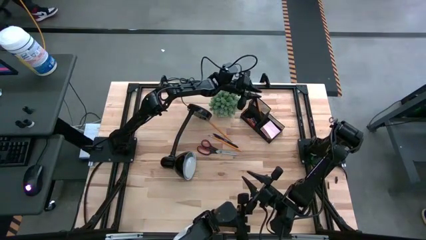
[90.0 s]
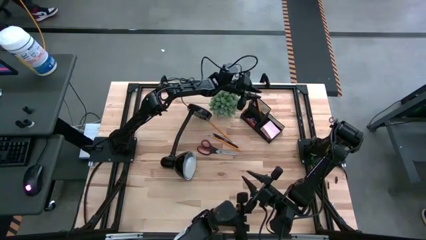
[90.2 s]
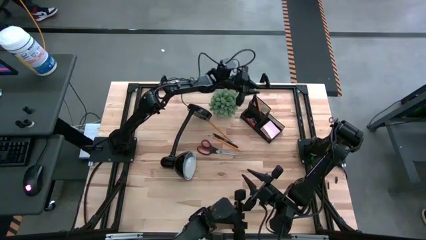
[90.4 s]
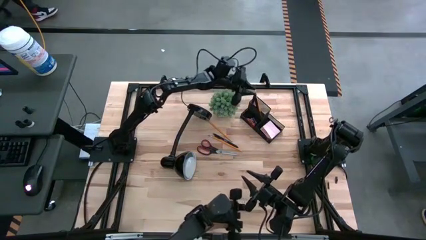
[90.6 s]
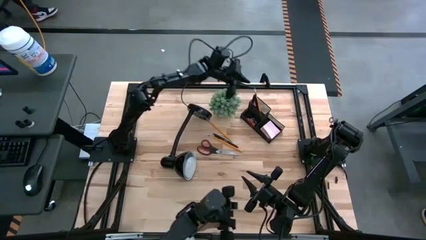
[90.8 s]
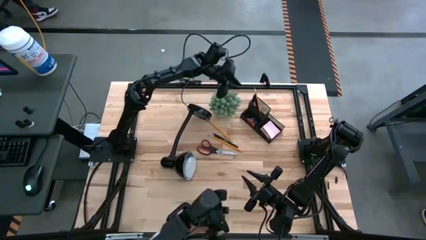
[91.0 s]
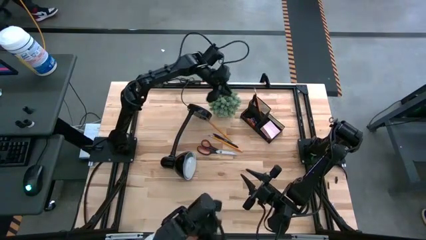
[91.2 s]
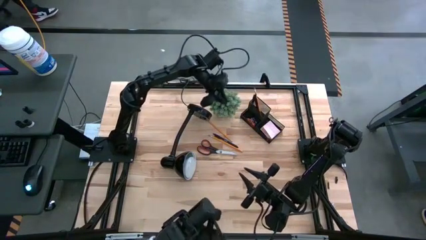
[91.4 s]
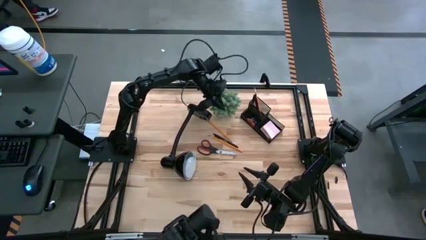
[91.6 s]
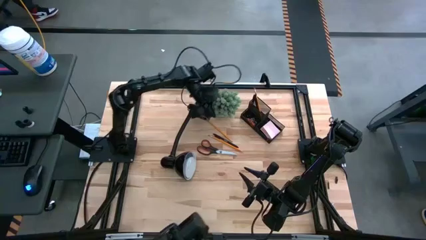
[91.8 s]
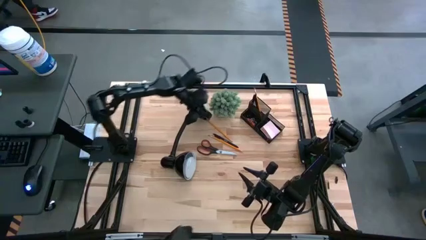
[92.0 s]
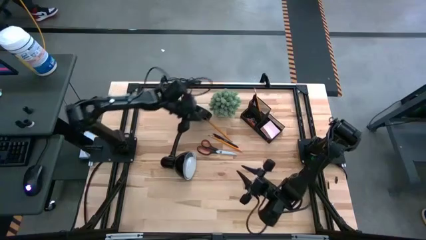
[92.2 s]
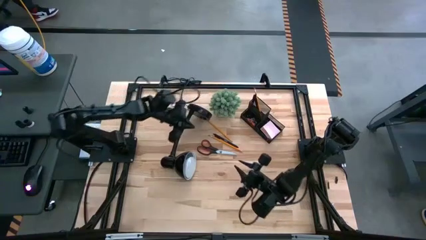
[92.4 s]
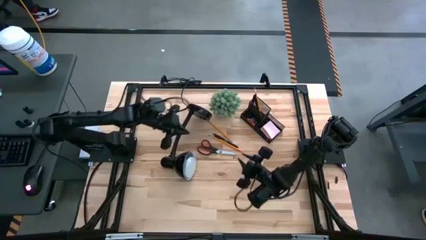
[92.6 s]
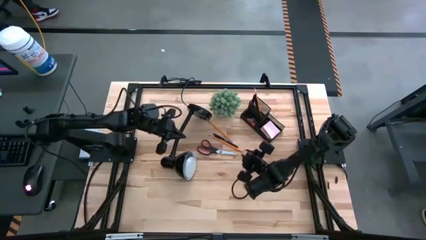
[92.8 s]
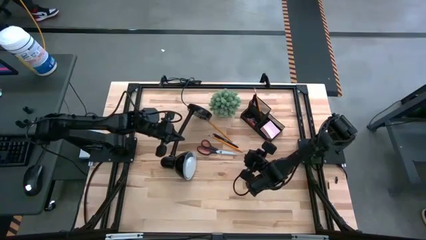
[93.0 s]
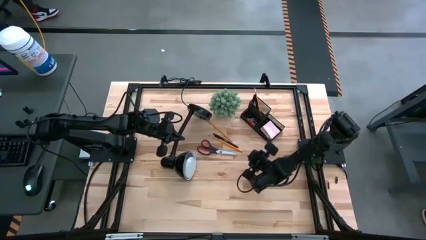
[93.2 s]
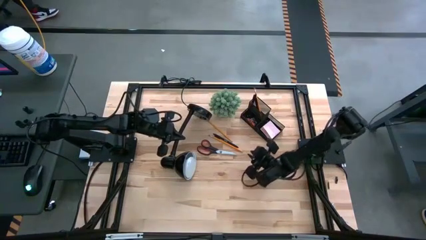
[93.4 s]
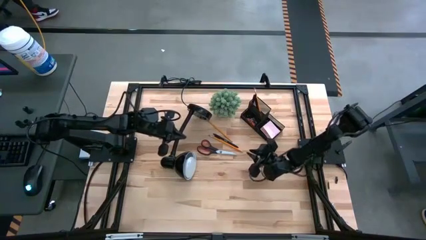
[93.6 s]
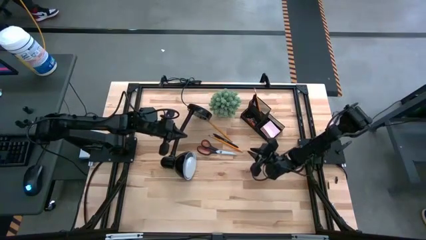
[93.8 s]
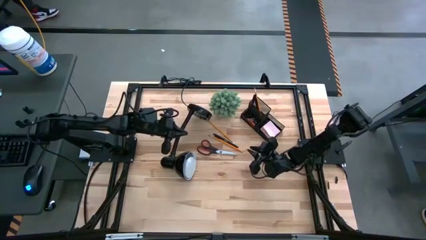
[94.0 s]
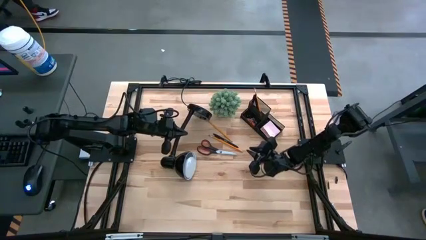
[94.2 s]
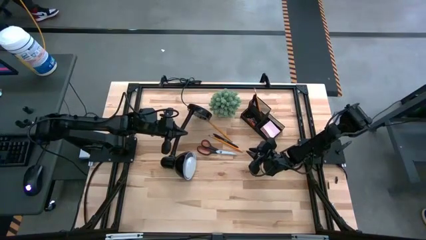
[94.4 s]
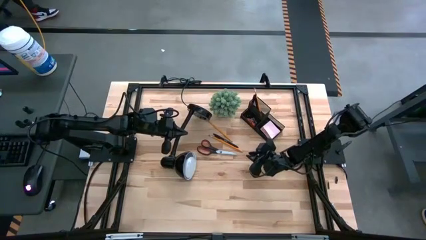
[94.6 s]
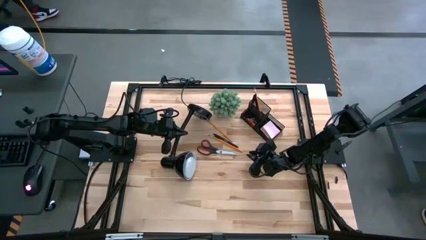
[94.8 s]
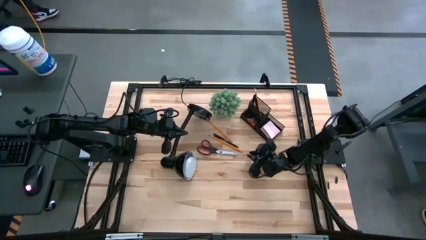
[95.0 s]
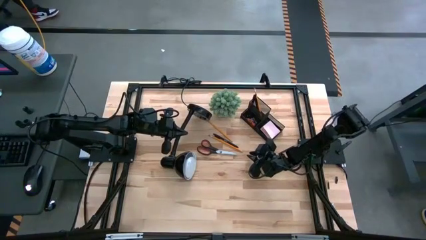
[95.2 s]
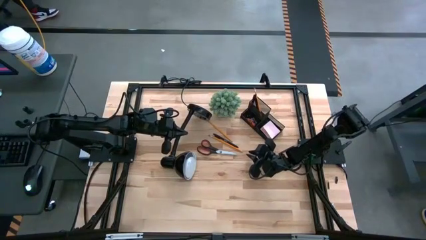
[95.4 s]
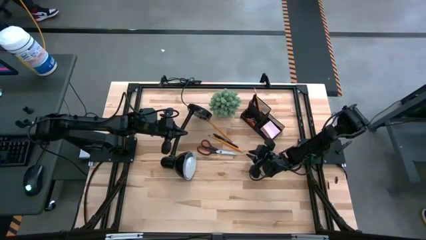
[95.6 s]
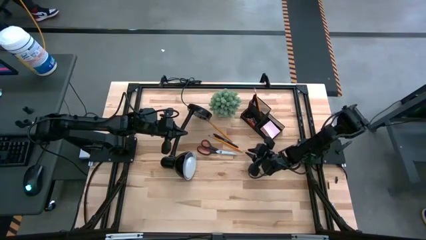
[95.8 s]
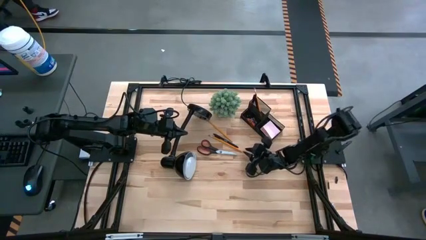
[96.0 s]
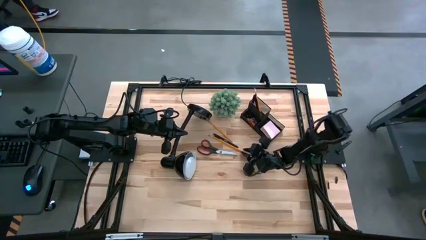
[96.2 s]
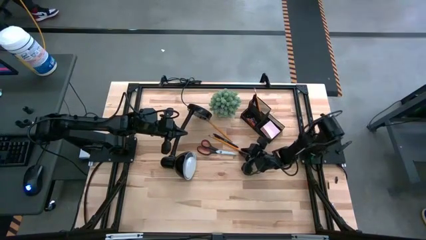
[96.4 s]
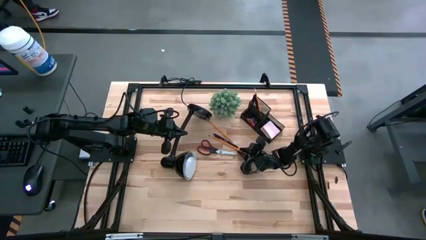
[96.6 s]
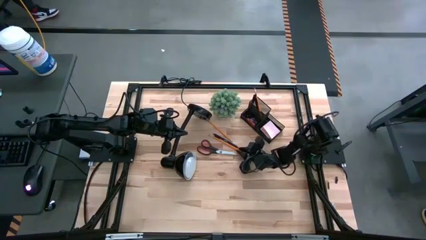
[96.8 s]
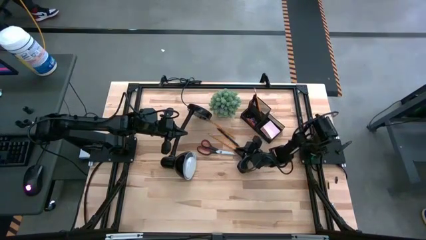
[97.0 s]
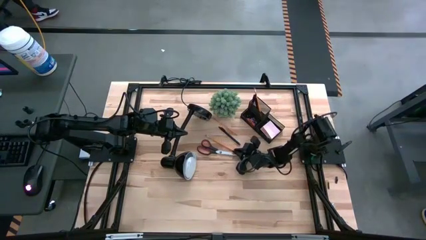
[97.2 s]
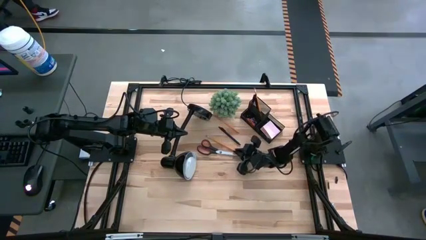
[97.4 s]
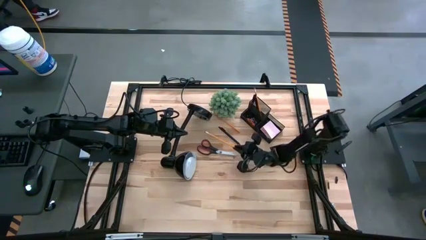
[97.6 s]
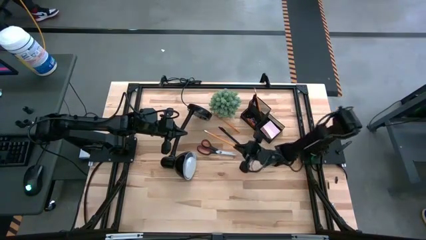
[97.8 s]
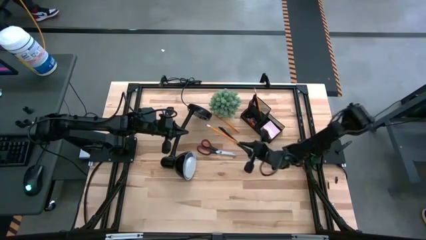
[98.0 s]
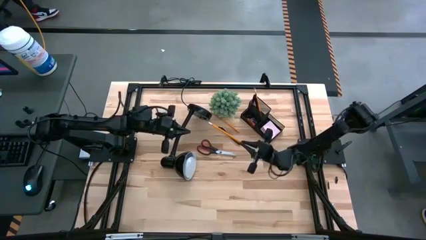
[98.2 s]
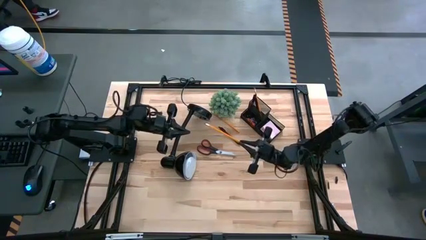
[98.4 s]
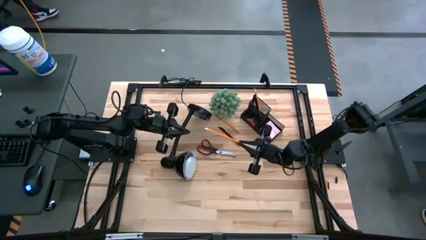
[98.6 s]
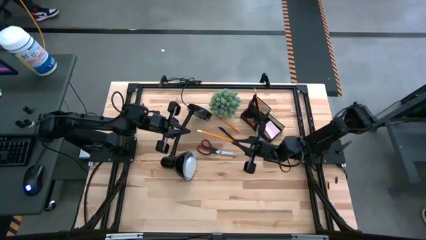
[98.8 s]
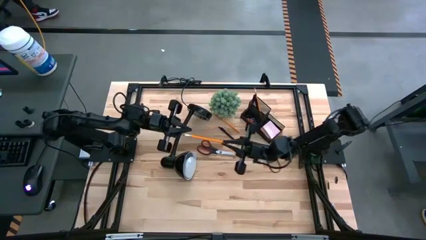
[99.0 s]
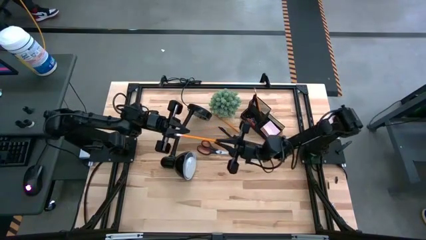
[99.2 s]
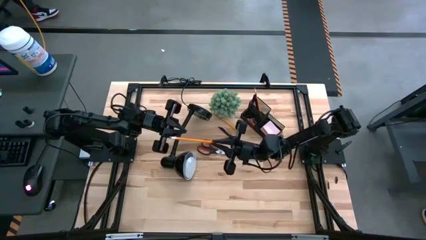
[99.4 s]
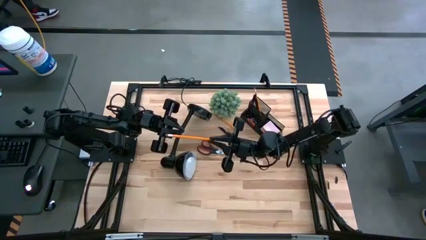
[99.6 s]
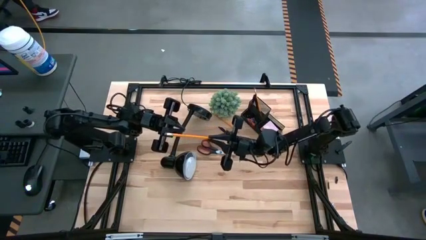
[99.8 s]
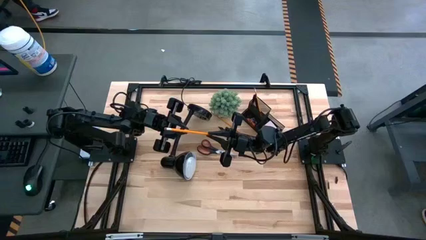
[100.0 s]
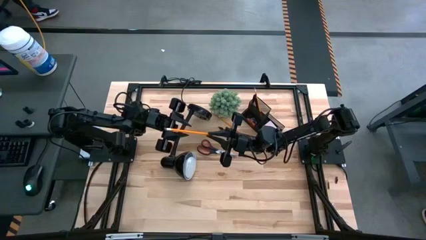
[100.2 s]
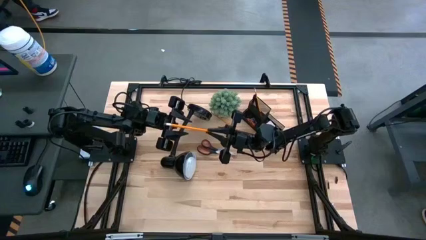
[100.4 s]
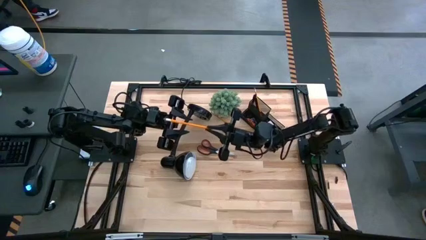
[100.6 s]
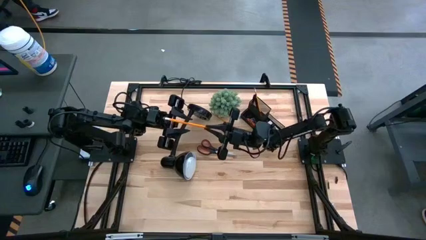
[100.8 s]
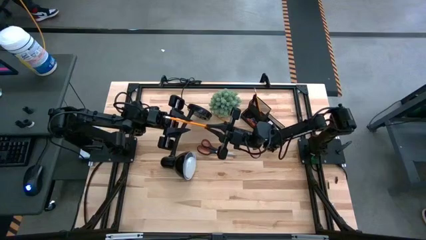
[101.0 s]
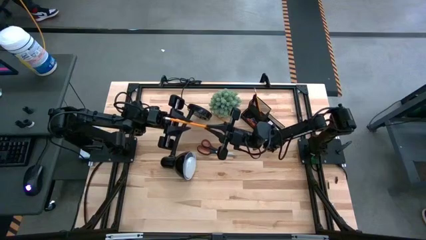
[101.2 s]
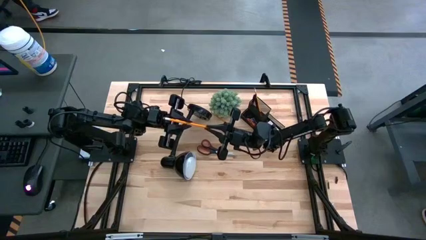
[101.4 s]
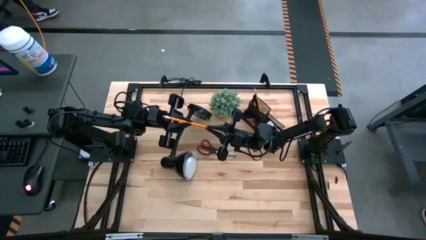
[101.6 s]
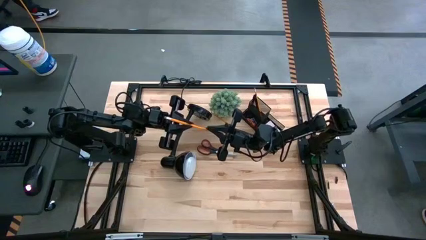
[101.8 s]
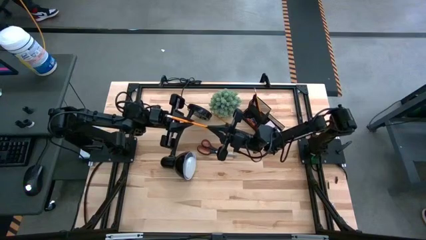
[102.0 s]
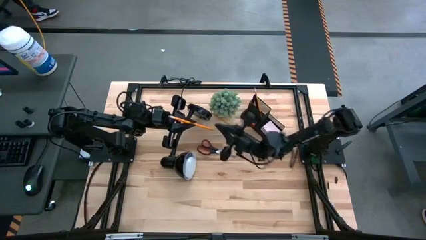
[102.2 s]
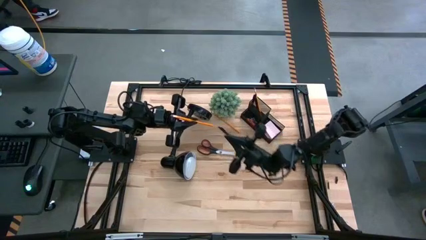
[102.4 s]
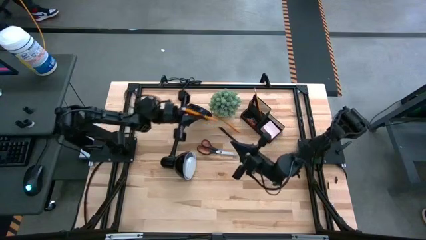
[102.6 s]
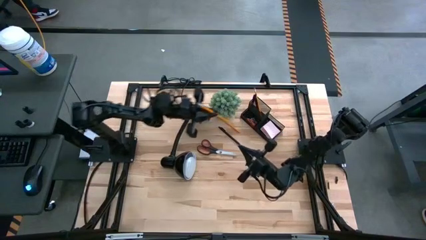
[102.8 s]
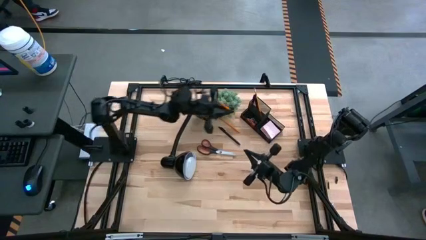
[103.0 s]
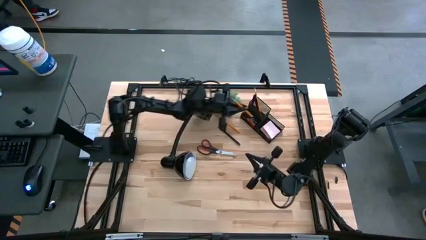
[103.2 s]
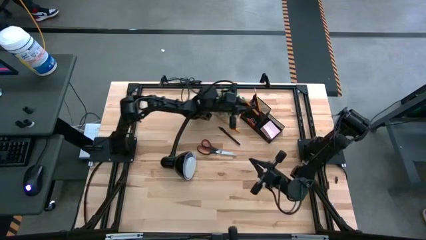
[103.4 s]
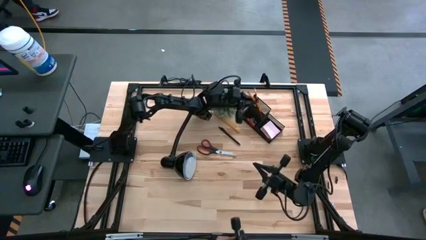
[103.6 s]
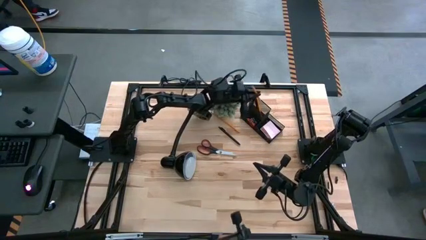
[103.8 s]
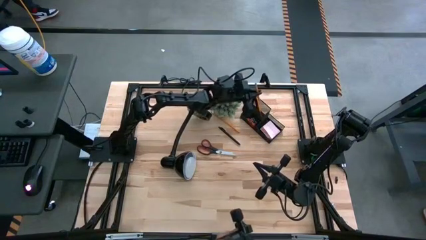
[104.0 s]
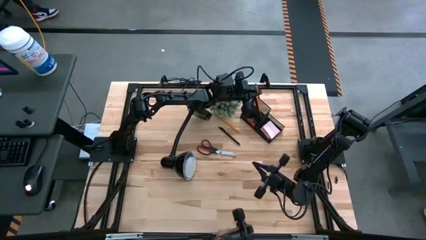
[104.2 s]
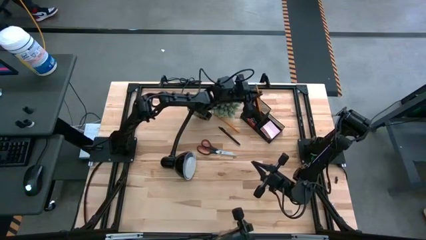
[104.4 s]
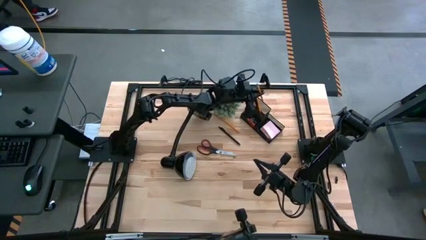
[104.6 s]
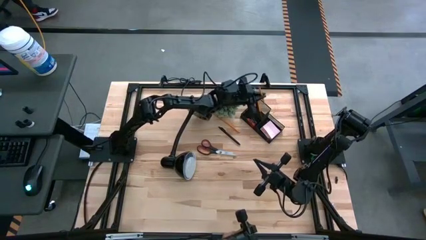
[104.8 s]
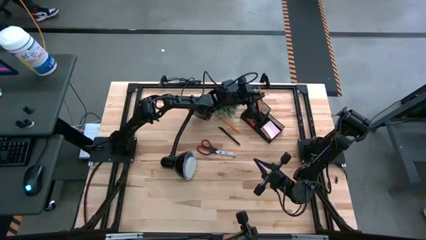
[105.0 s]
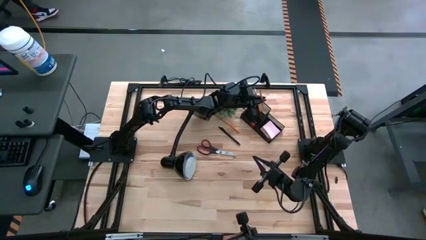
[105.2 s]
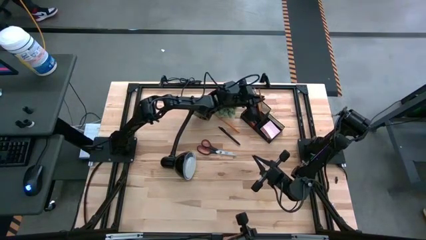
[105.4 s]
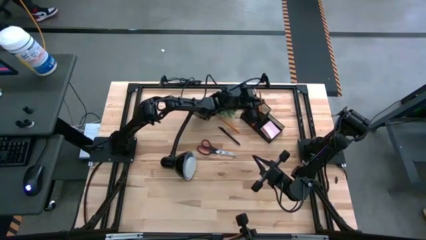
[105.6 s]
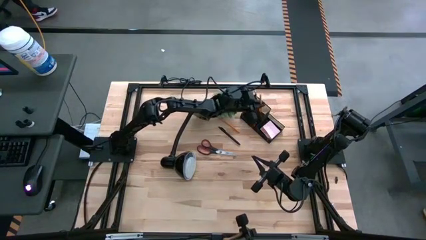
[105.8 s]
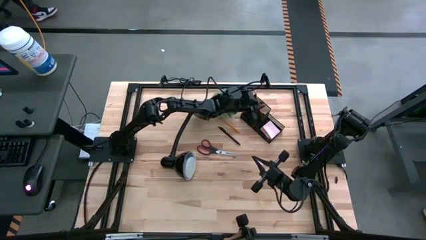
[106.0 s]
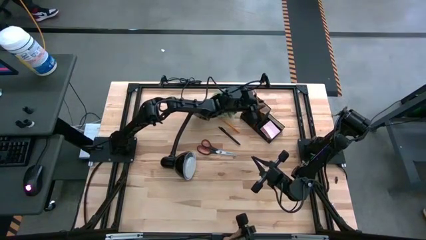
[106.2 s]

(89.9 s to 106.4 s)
Task: Pick and place office supplies into organizer
Put the bottom pencil into the top left section of the desk organizer
